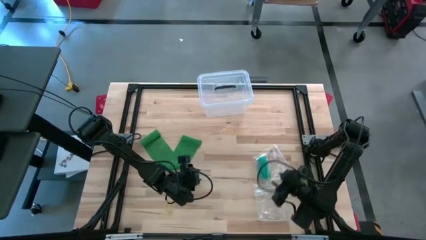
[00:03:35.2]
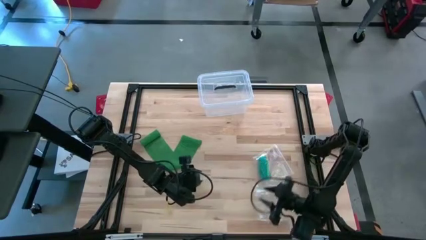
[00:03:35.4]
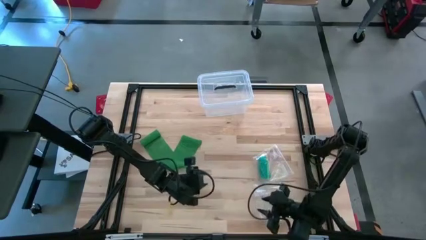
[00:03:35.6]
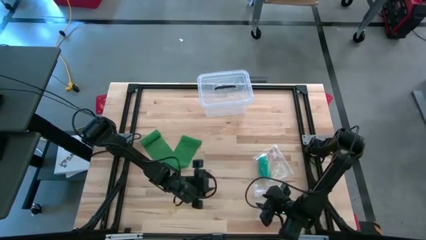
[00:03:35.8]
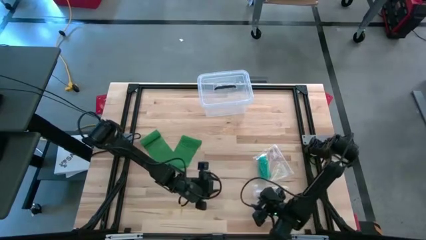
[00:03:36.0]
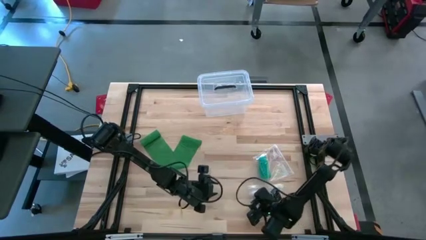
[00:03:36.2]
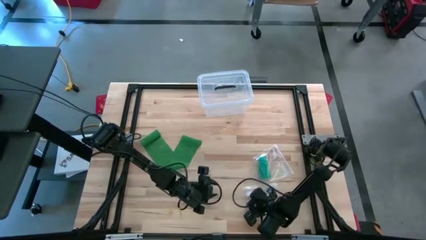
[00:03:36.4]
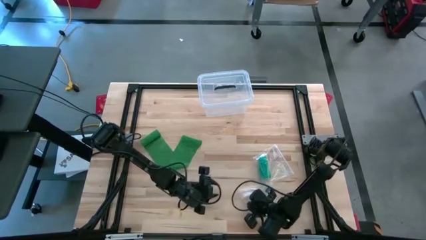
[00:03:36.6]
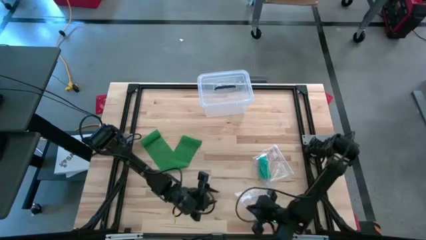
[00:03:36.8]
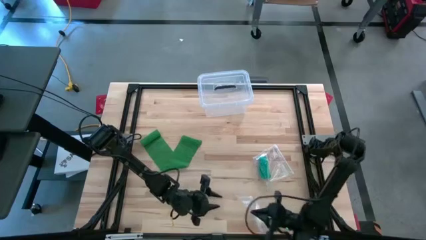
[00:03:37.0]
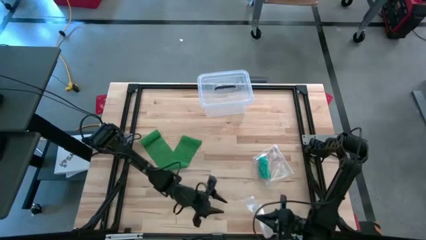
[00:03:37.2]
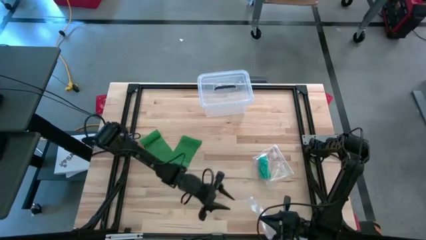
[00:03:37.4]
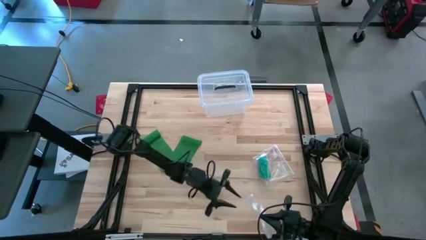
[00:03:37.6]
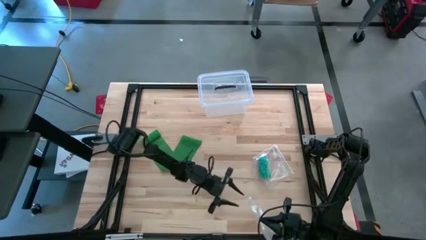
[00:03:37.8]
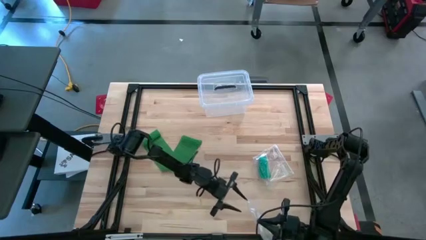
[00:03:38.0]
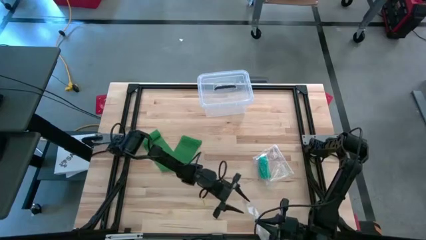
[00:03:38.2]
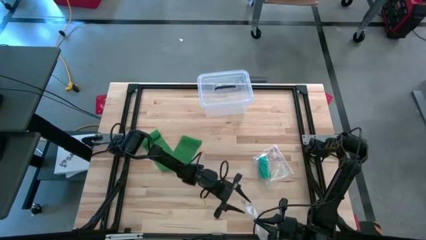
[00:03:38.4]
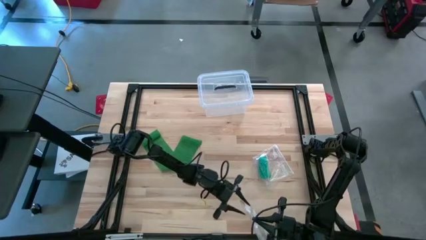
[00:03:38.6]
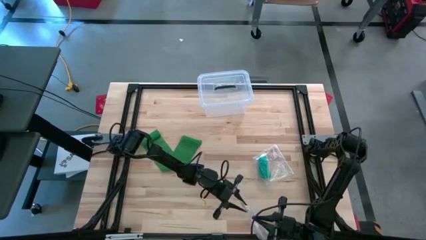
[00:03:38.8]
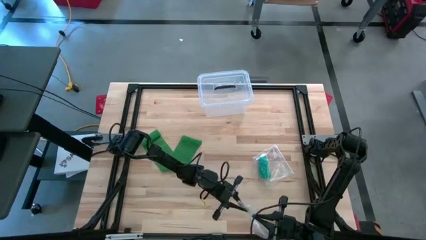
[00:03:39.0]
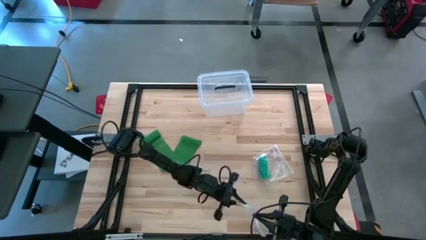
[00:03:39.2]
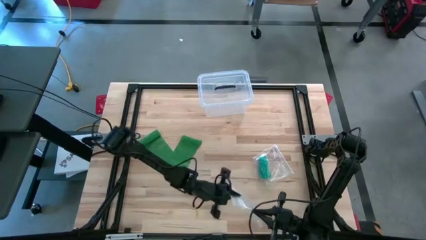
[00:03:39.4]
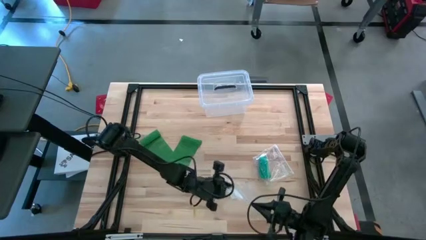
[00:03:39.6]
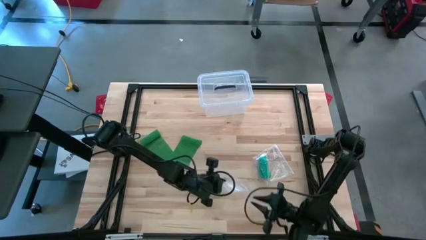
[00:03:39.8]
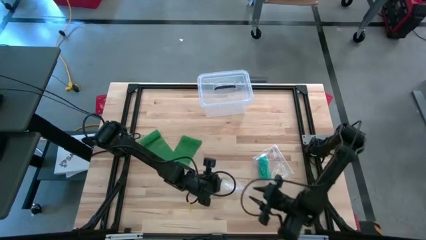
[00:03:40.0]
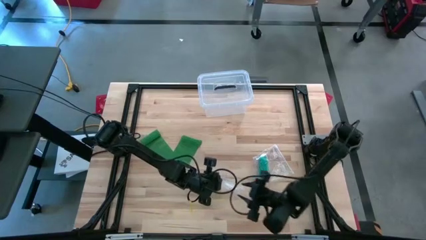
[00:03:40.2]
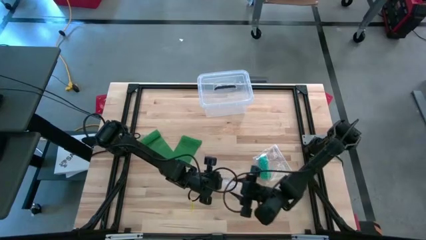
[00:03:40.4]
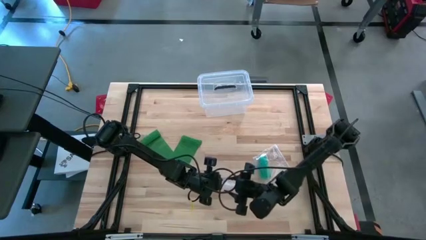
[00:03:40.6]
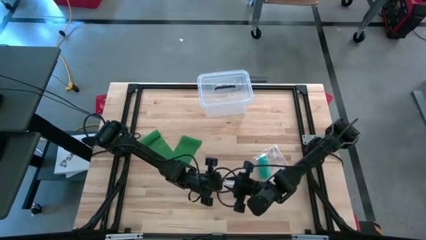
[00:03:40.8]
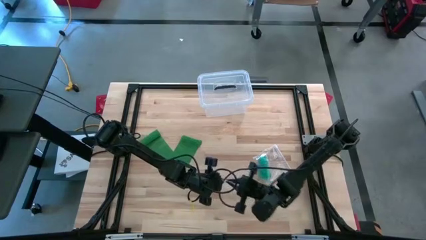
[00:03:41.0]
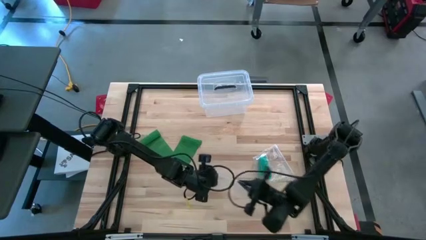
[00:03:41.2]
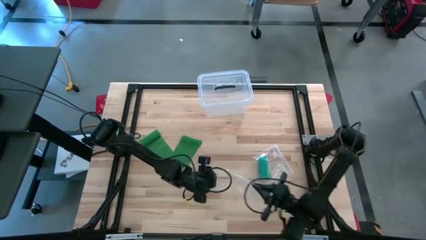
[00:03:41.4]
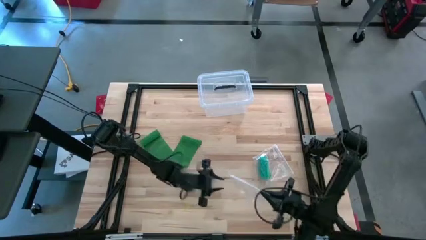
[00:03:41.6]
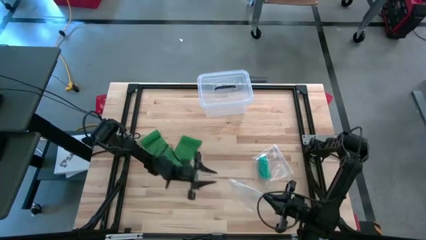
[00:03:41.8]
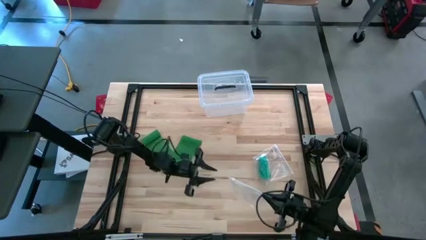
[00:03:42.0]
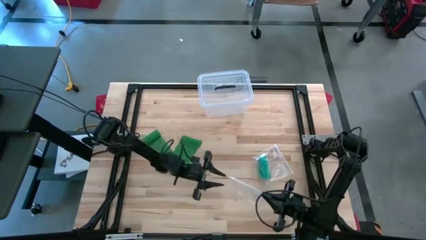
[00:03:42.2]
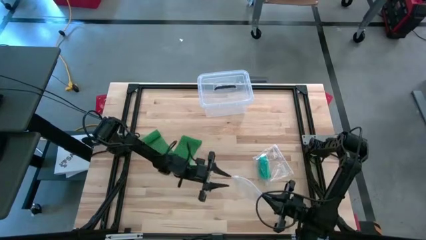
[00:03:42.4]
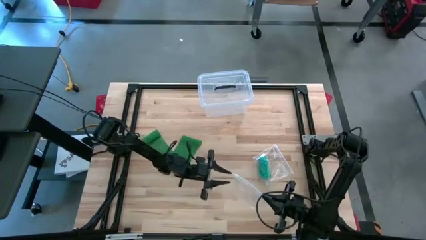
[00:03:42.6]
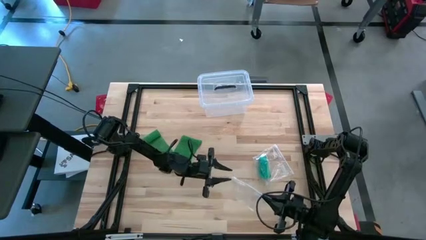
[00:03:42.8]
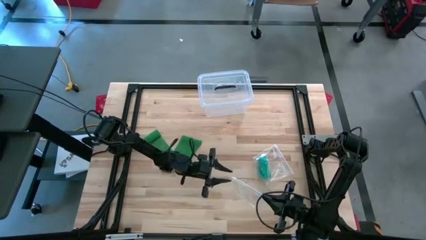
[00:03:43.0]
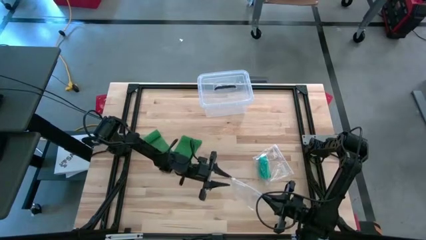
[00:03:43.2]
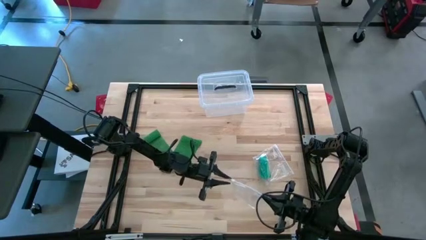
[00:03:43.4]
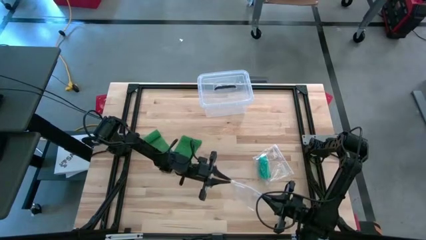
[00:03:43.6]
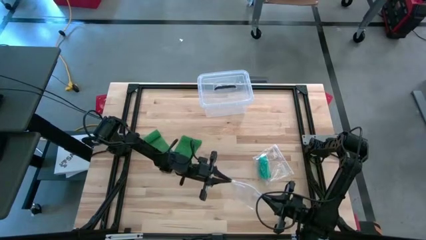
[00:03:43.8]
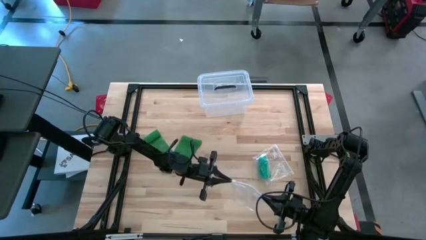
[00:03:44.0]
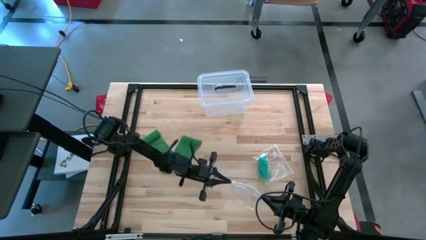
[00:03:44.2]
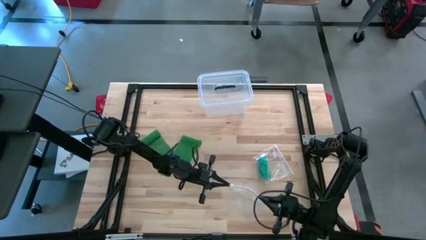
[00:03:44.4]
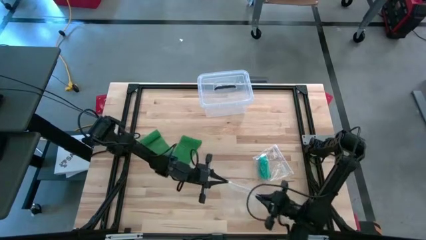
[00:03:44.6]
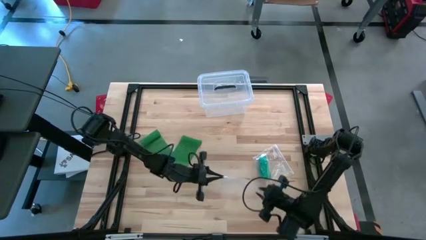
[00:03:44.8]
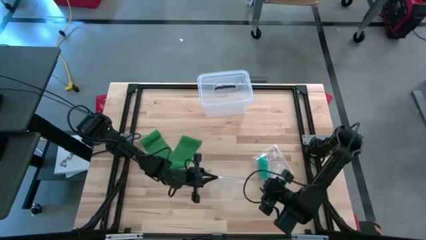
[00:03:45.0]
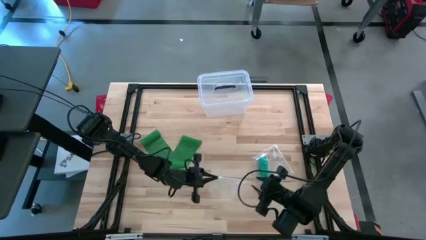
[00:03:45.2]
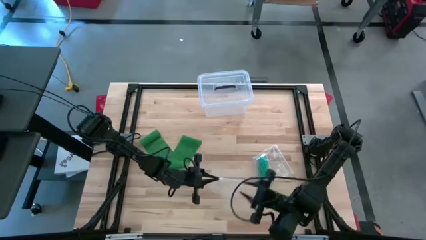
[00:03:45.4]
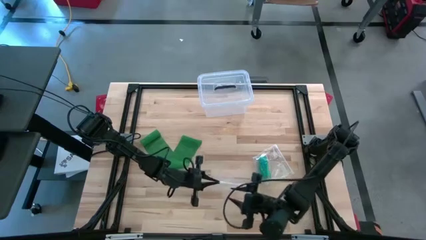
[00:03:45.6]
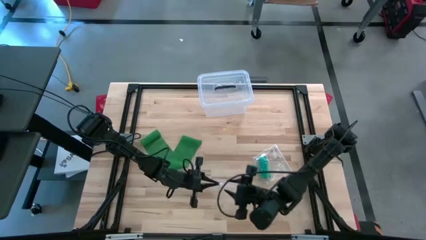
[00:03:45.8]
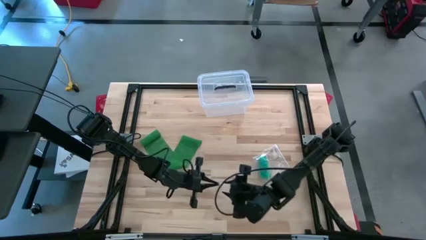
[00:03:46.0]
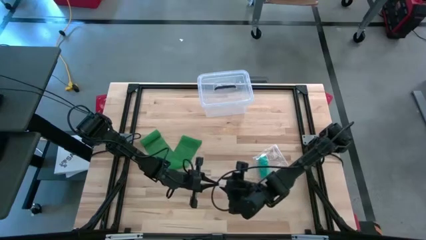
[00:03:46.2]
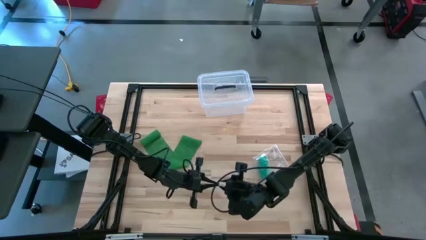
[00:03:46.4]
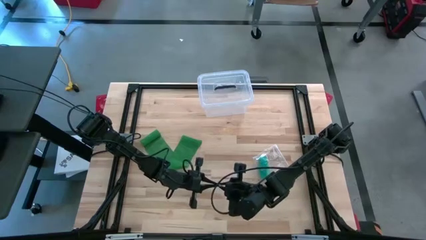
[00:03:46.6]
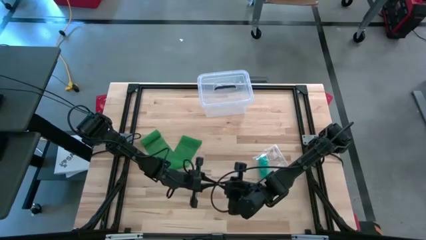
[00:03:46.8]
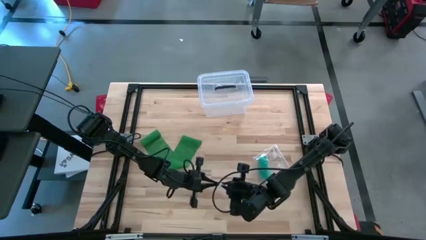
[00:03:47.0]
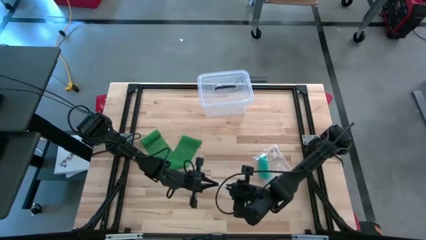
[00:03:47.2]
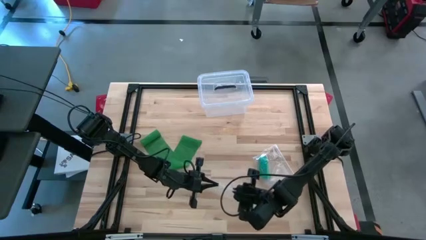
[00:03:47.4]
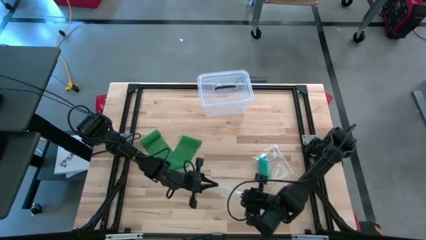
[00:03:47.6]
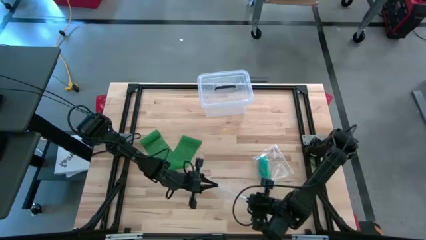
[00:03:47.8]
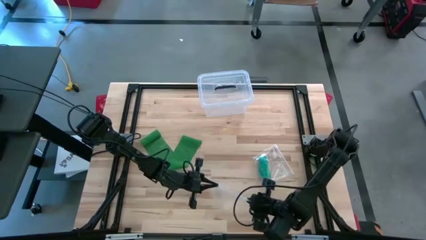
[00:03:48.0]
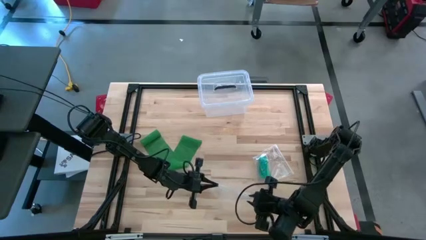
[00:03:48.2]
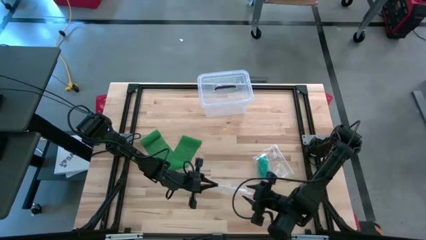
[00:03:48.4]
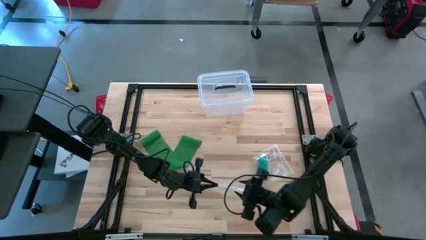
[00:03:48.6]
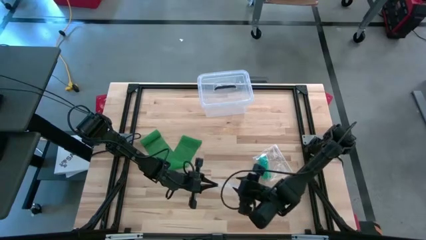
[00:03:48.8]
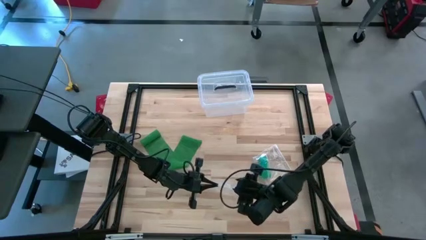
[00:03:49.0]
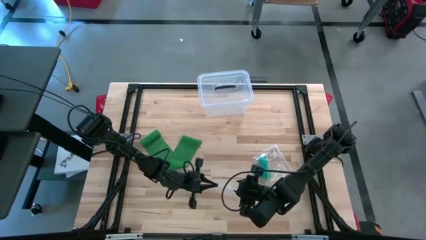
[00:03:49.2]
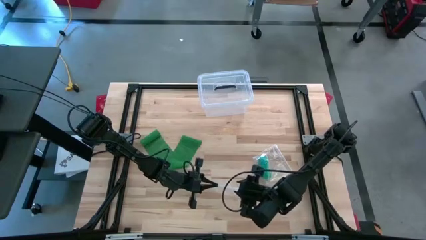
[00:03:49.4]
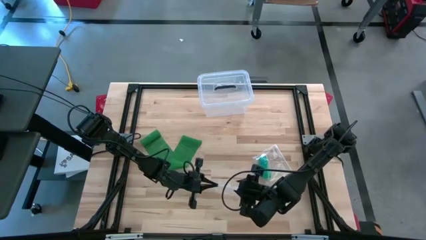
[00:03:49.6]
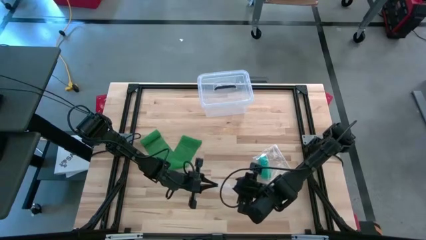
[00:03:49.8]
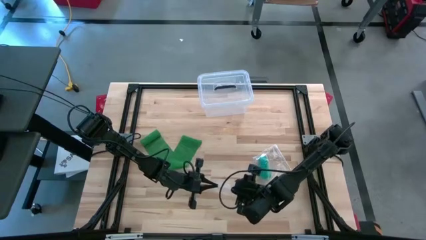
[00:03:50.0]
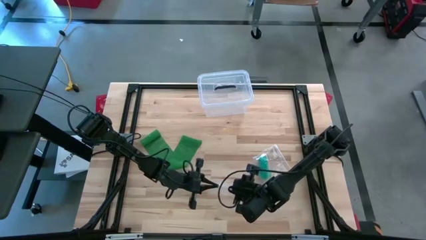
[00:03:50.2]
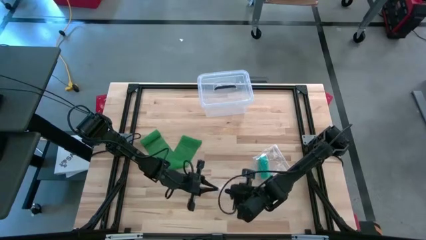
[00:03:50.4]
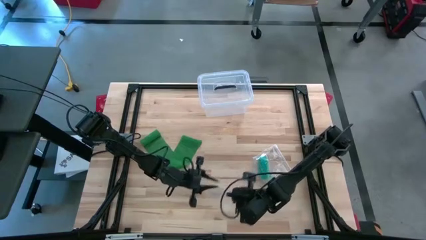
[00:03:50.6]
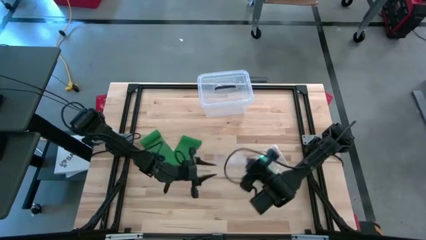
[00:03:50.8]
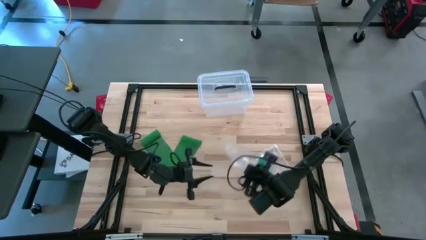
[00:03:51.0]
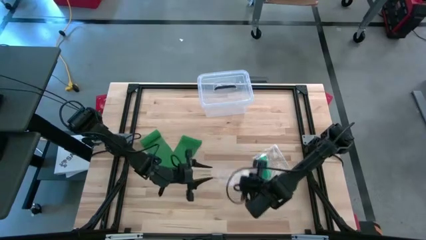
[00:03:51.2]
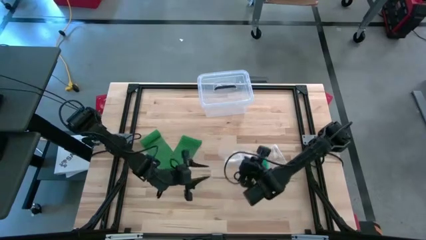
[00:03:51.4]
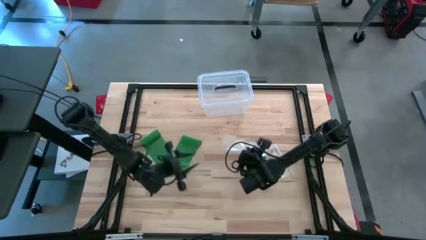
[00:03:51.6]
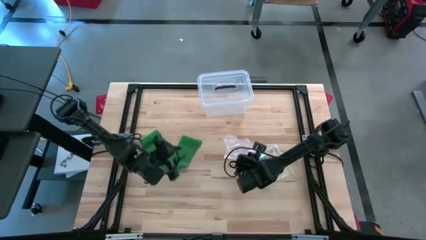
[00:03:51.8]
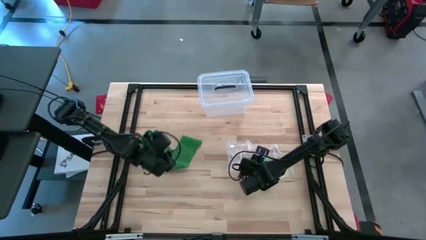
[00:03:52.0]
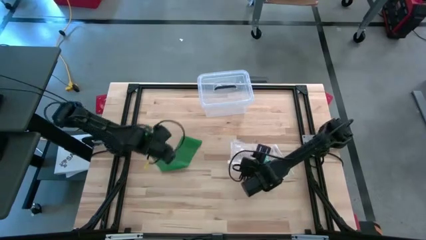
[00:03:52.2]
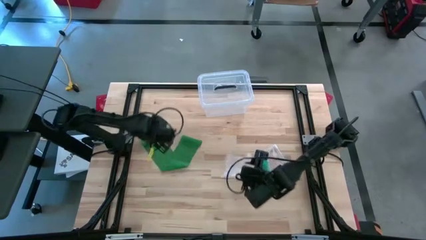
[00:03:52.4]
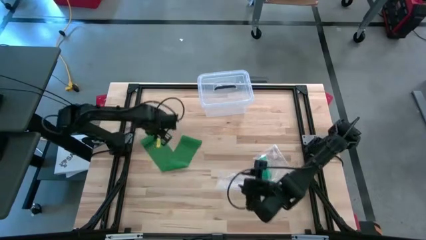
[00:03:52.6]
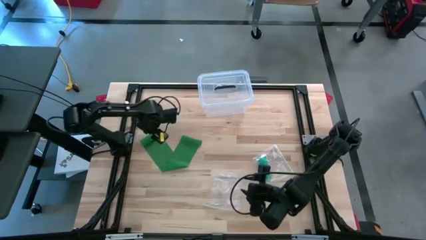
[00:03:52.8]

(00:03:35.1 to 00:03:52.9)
Task: Roll bandage
Open the transparent zip bag
